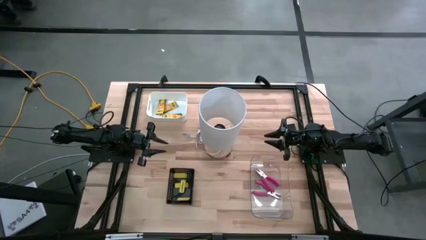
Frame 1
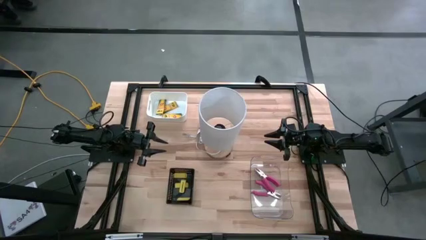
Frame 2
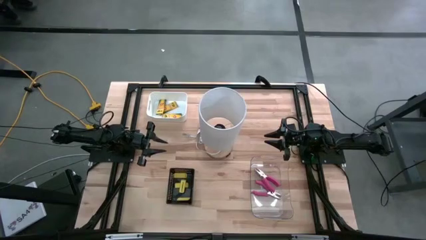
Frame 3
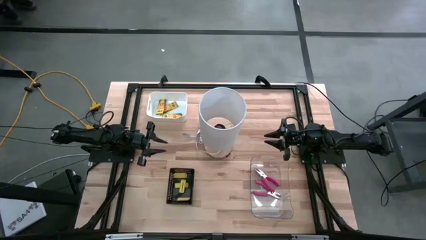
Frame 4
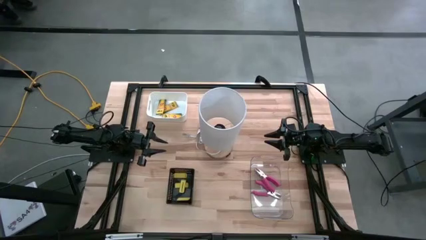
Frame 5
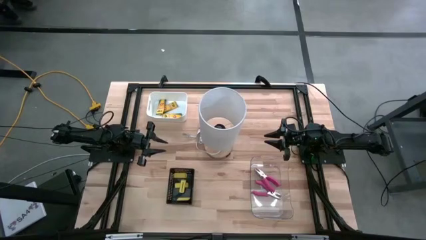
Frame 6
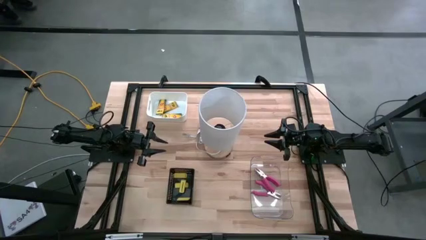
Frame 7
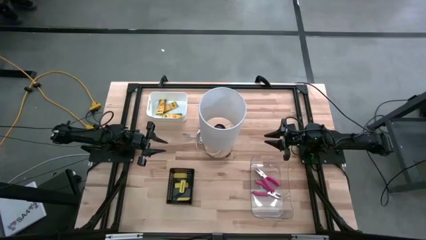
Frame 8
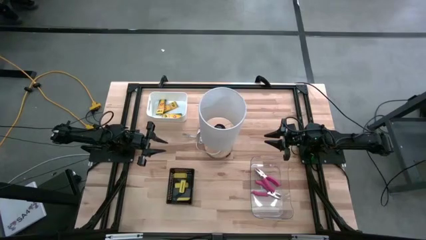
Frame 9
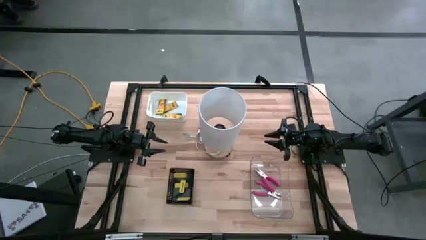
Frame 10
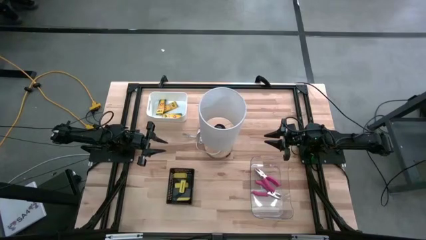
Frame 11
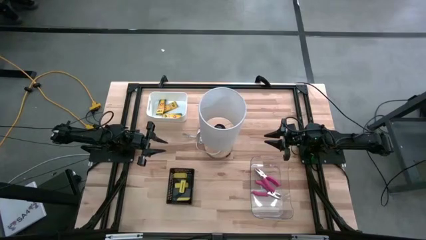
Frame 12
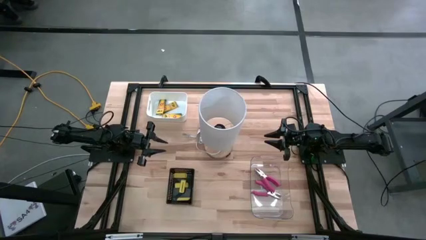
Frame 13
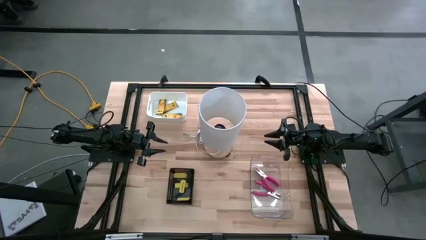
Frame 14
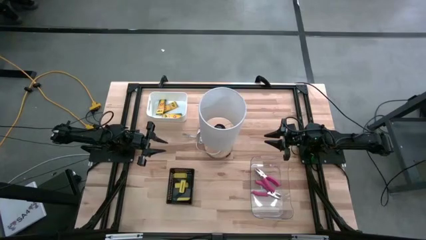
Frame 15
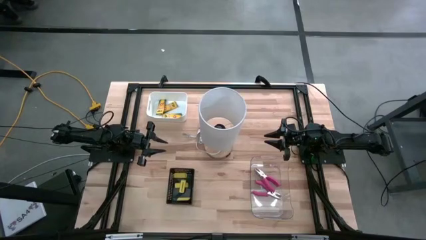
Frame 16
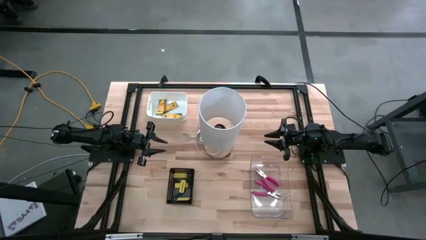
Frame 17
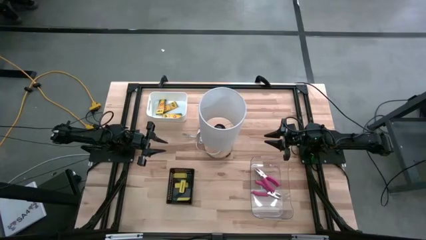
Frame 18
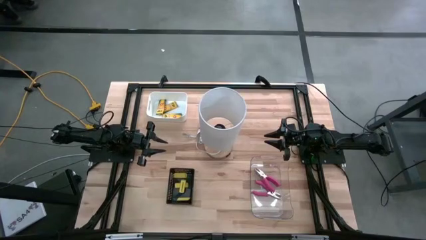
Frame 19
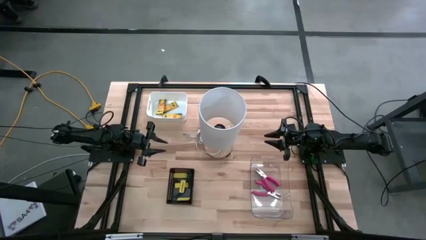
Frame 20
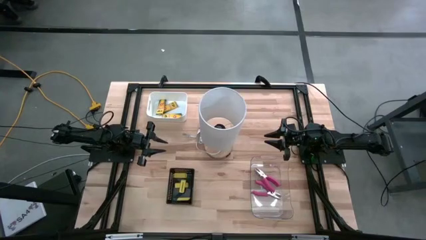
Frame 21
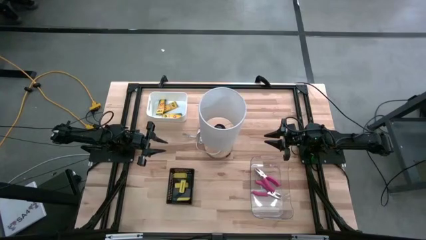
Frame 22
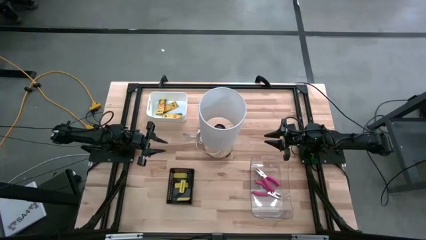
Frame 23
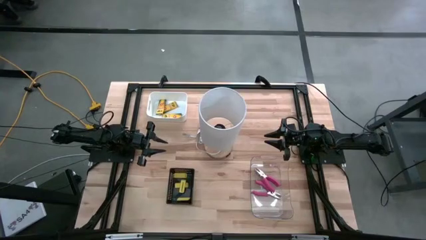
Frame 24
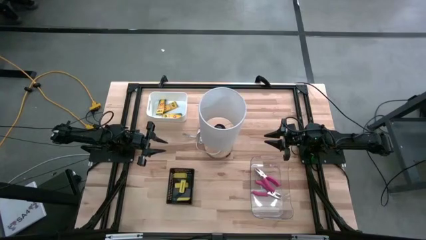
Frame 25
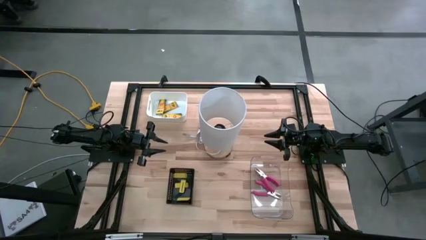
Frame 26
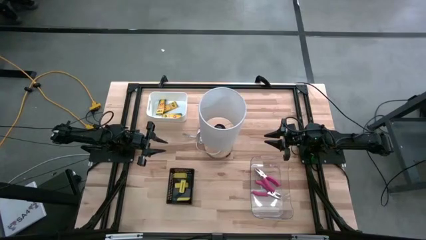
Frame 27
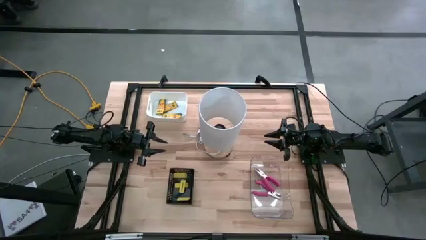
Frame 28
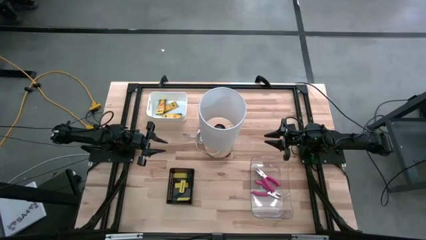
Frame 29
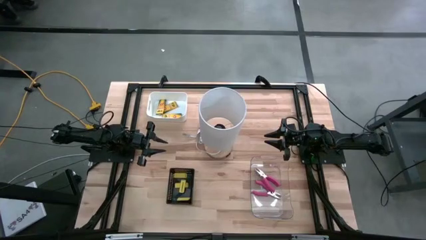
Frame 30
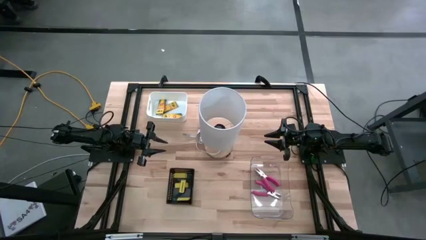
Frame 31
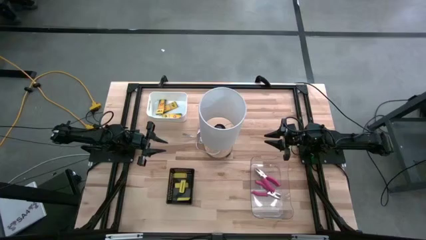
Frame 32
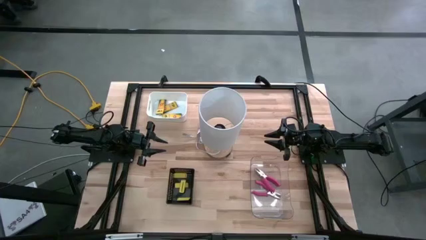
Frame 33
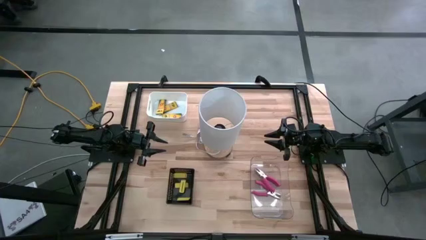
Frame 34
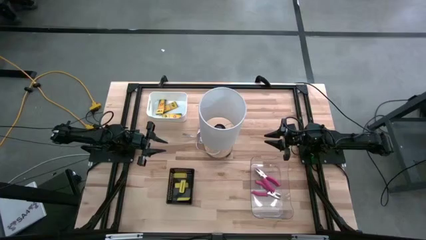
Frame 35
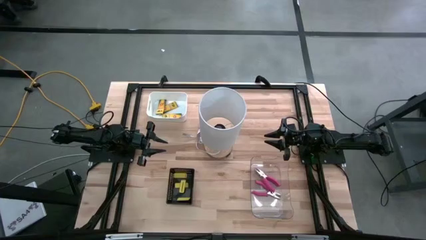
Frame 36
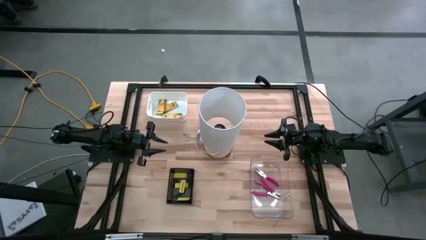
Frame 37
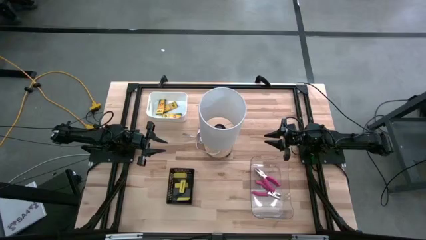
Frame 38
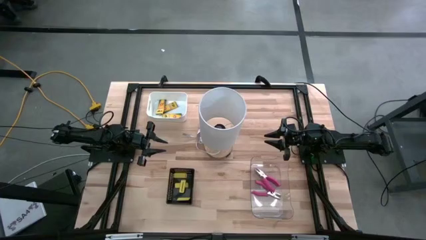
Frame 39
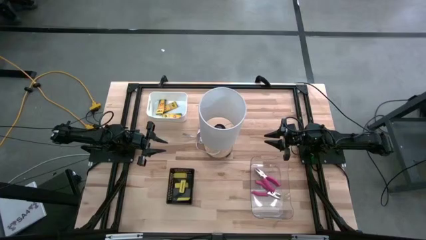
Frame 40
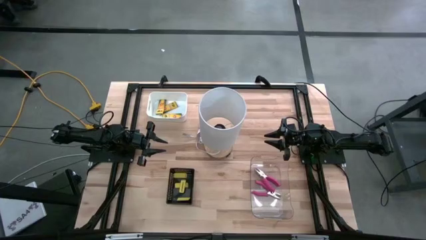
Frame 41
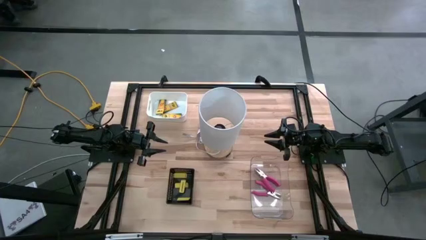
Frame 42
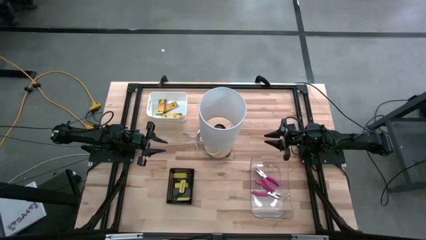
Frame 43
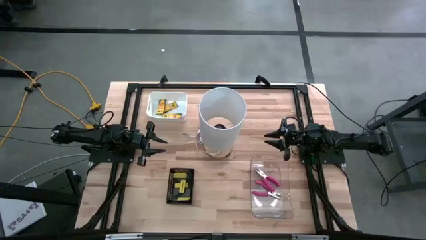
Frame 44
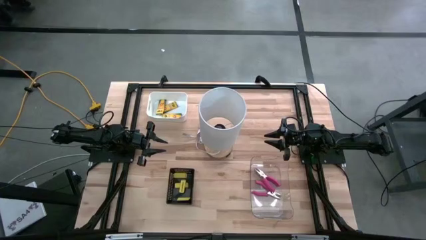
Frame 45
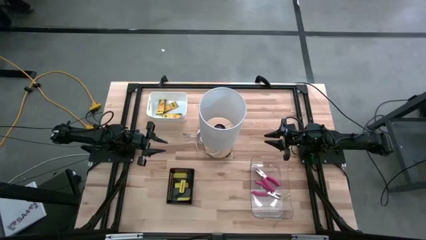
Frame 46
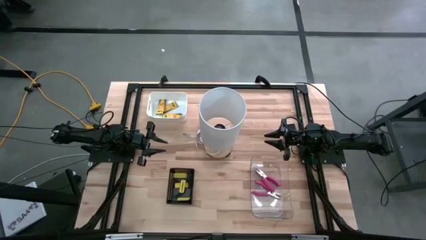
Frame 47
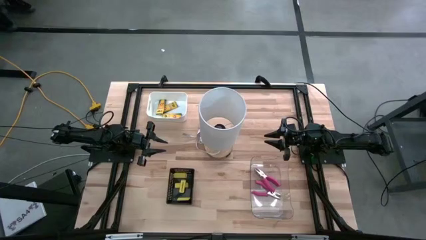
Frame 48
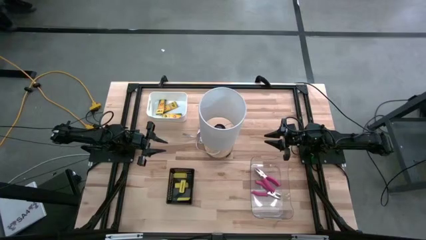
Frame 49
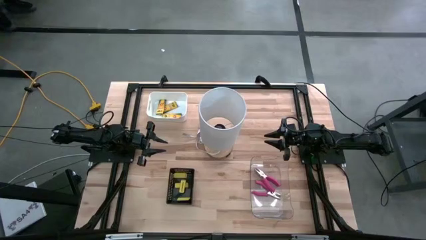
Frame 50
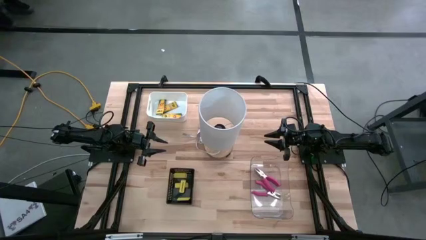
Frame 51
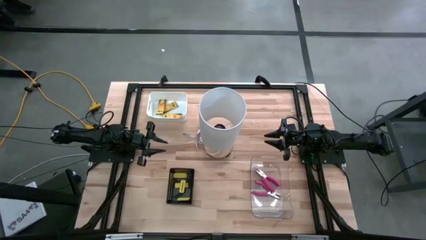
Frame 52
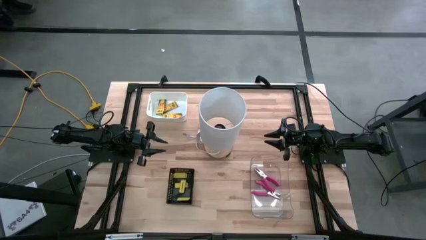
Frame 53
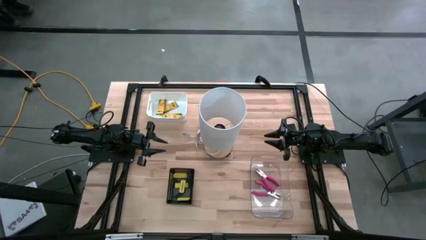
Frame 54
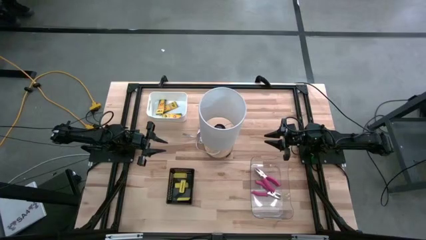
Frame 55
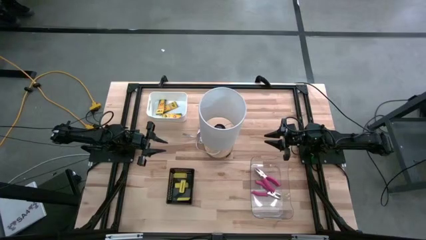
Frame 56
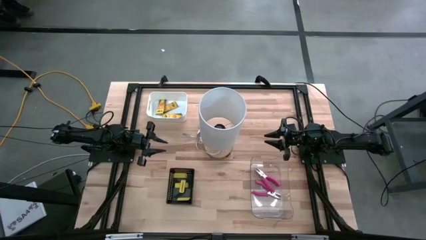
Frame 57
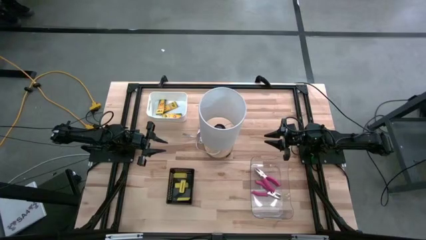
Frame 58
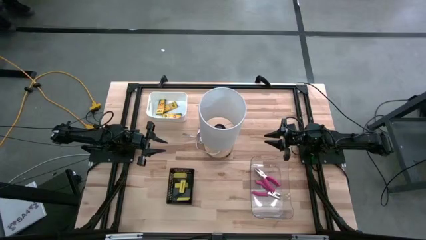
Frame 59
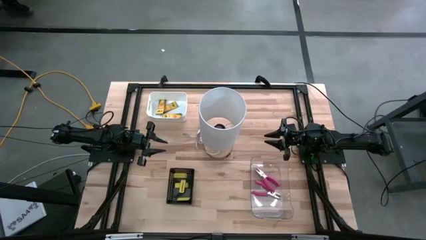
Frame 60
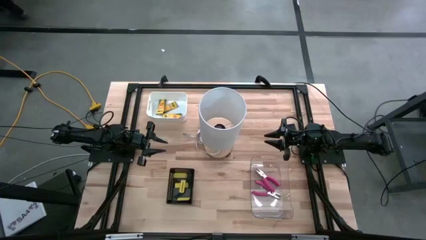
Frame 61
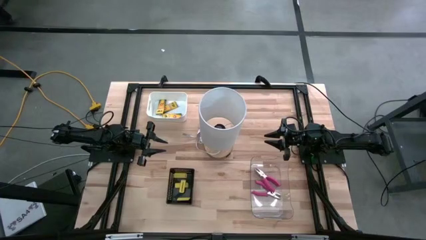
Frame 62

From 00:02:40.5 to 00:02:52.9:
Task: Pick & Place School Supplies
Return to Home Position

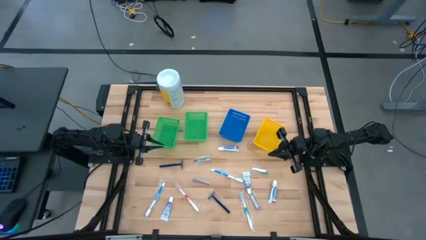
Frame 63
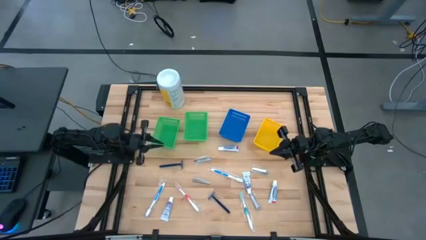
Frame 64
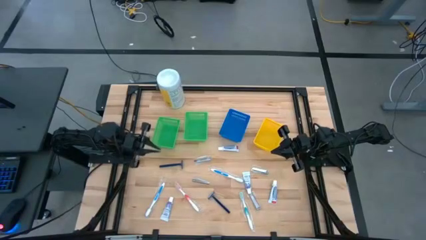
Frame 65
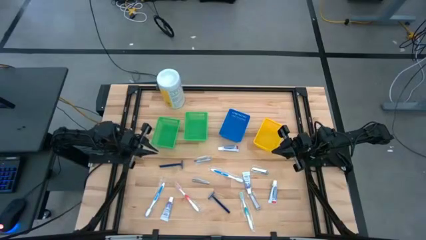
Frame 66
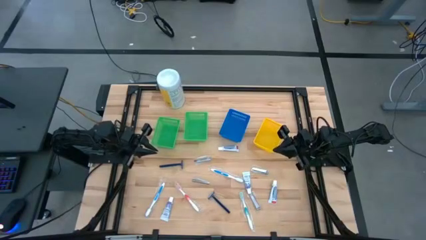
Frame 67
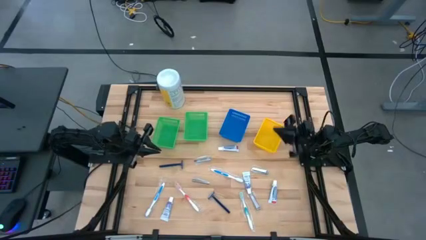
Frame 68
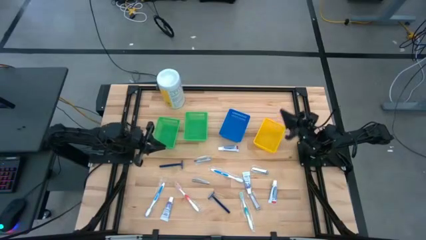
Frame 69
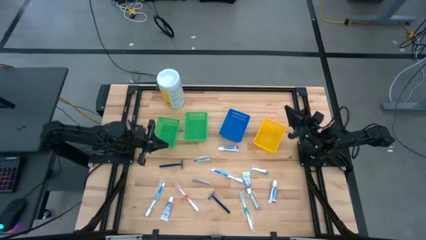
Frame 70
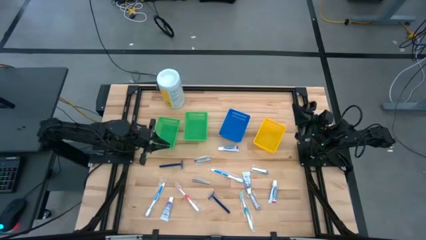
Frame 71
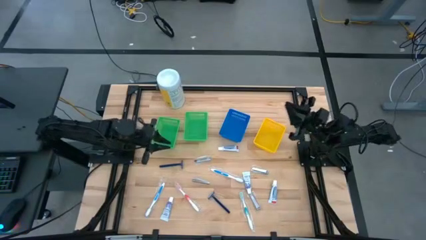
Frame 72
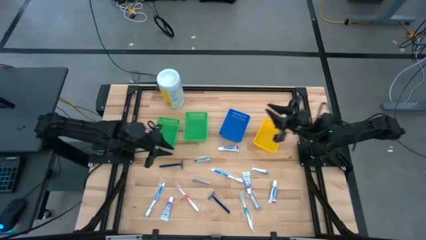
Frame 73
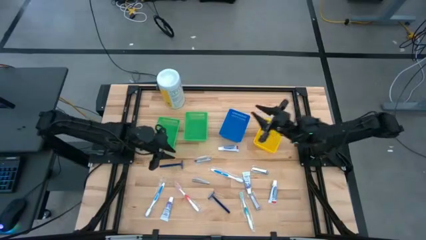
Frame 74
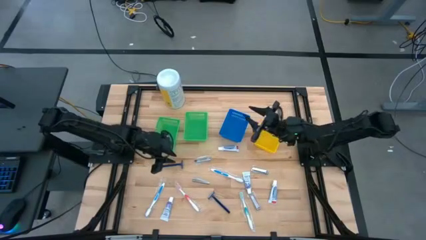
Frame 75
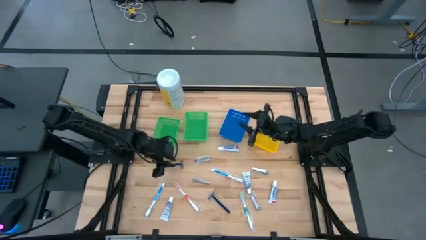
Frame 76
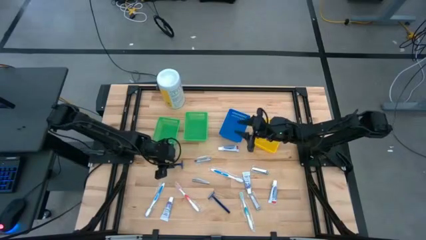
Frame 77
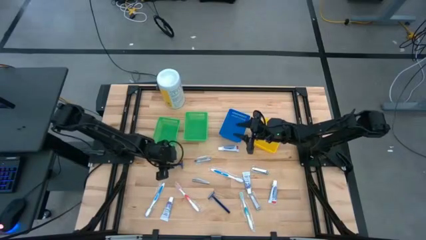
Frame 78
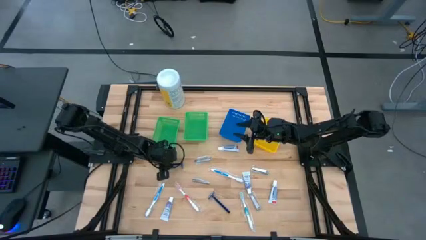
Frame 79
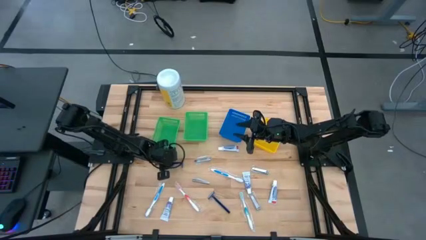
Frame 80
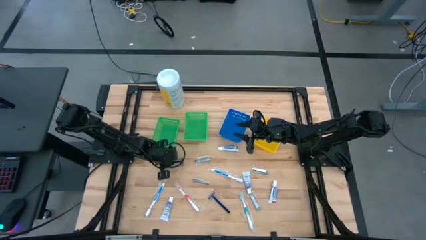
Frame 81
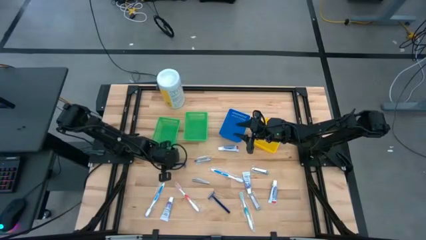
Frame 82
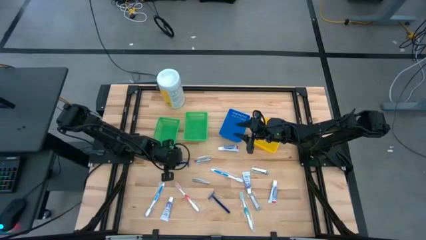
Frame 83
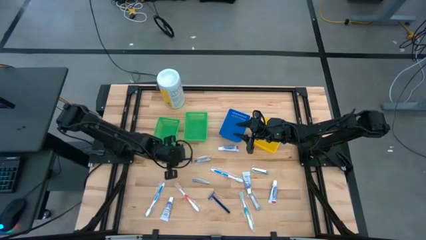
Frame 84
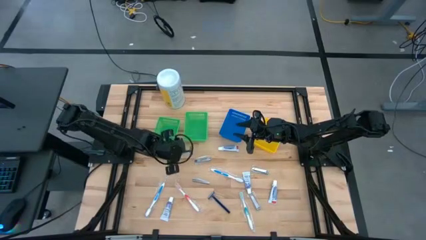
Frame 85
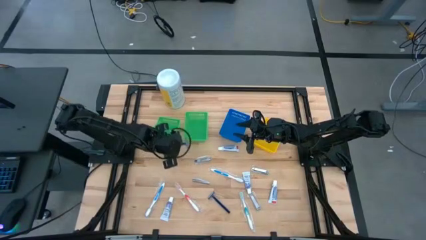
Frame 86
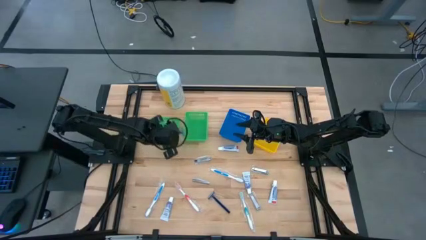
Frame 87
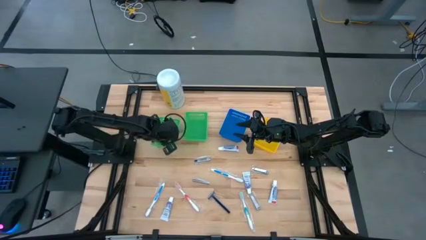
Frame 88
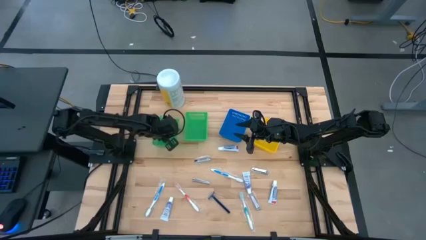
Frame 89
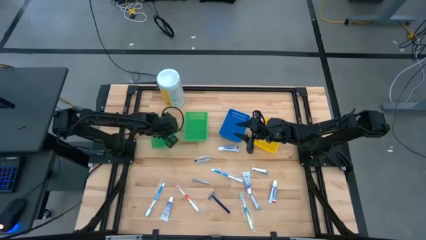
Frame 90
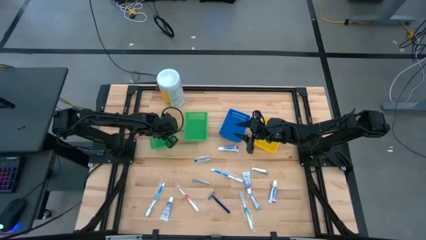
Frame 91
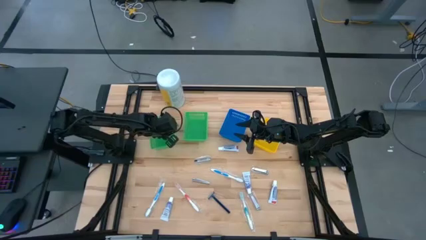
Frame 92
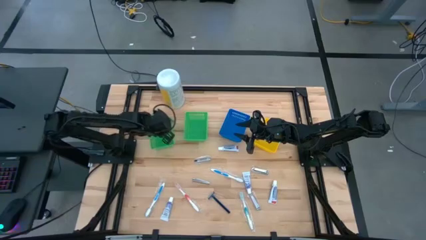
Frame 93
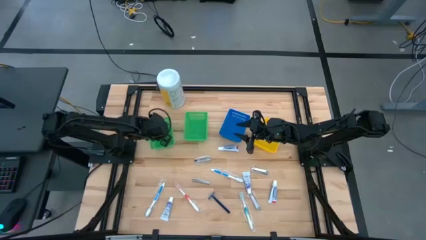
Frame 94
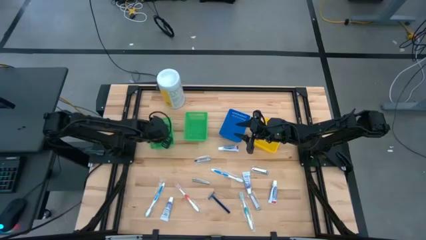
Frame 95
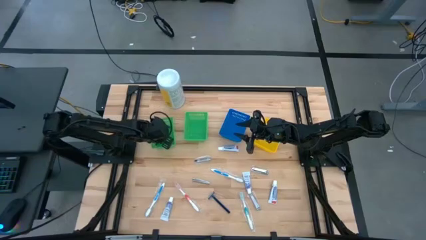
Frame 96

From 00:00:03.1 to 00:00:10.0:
Task: Pick & Place Travel size toiletries
Put the top blue razor into the left green bin
